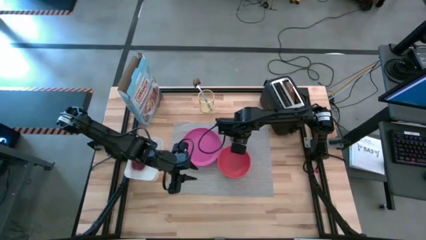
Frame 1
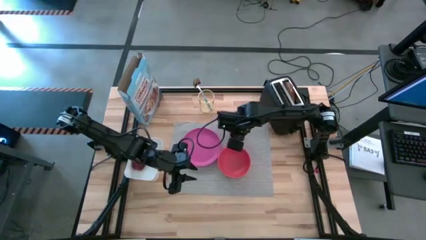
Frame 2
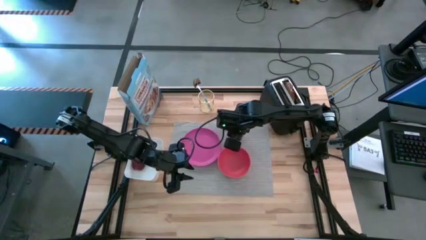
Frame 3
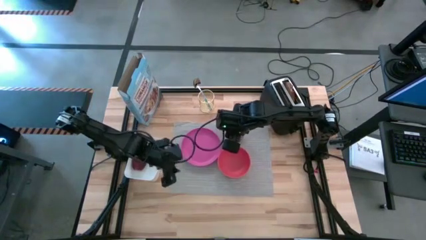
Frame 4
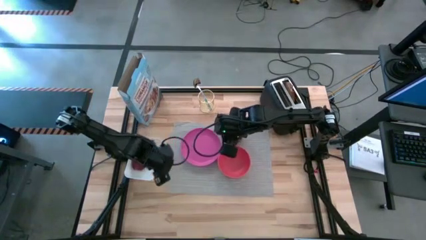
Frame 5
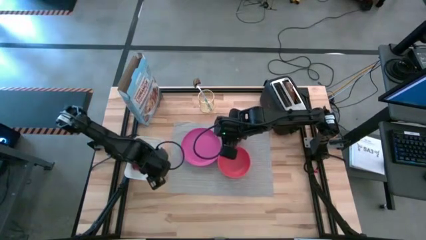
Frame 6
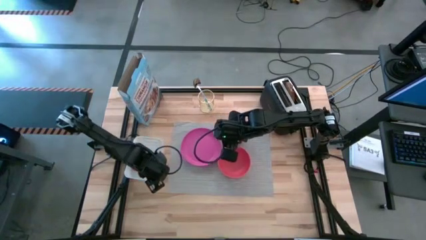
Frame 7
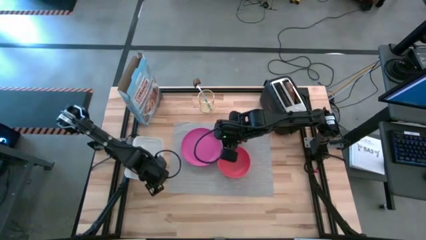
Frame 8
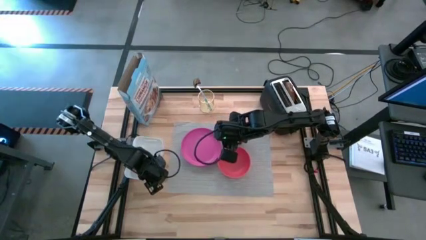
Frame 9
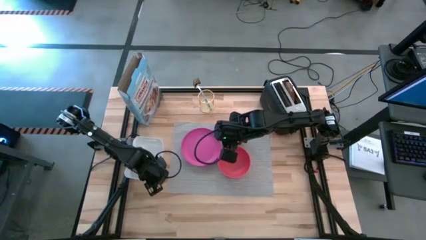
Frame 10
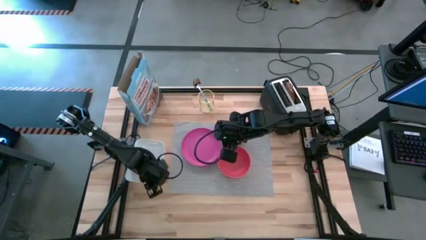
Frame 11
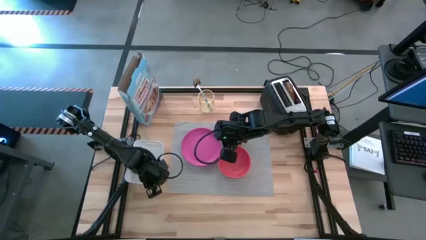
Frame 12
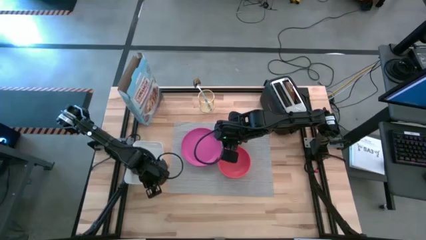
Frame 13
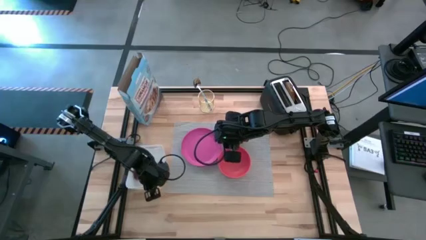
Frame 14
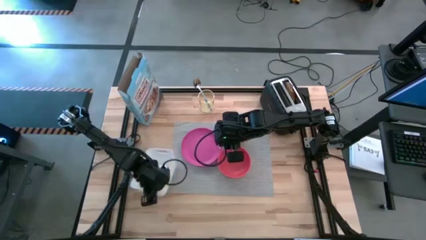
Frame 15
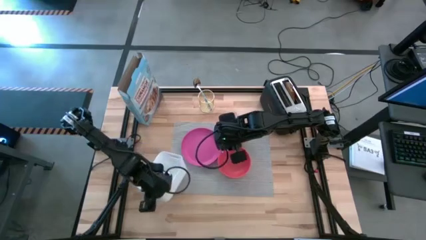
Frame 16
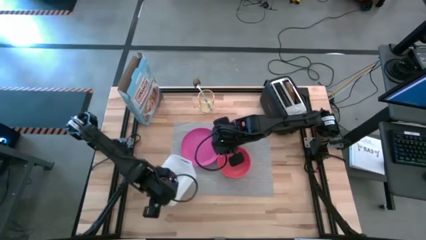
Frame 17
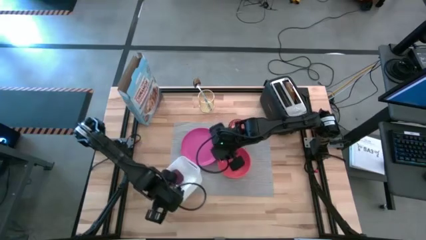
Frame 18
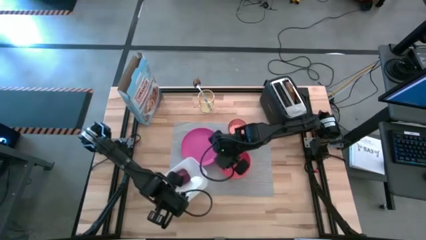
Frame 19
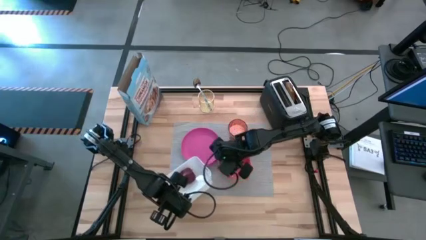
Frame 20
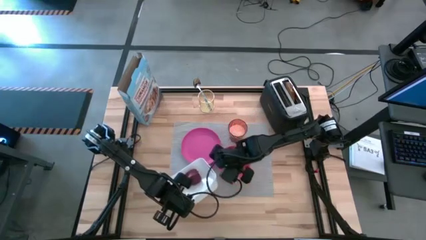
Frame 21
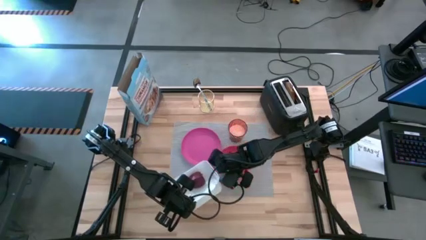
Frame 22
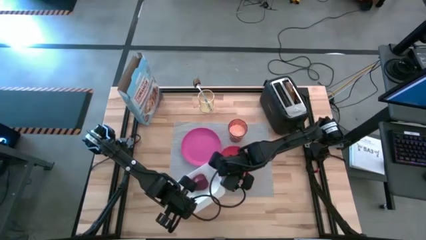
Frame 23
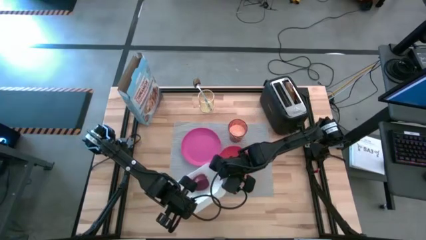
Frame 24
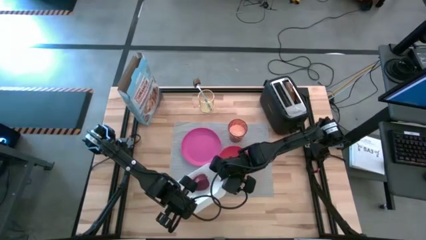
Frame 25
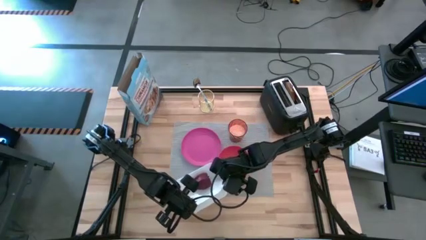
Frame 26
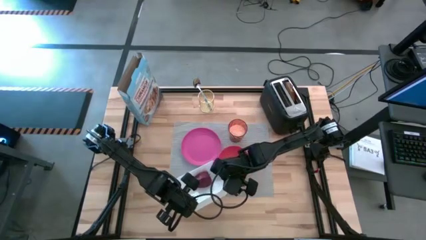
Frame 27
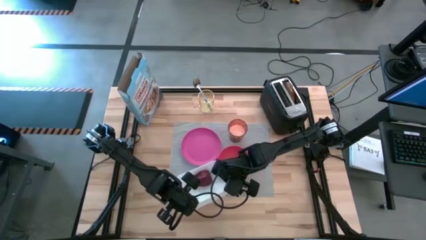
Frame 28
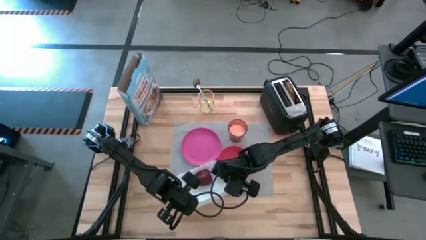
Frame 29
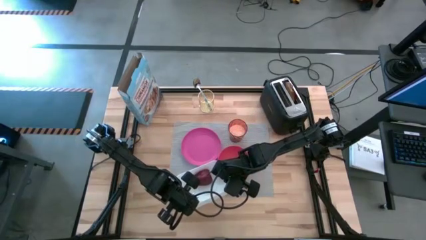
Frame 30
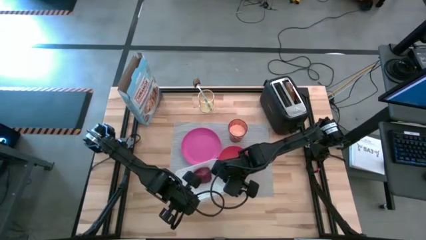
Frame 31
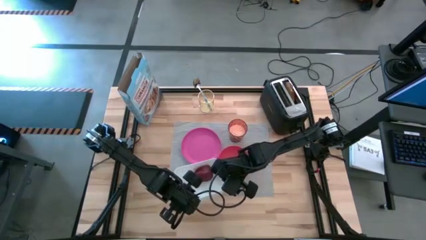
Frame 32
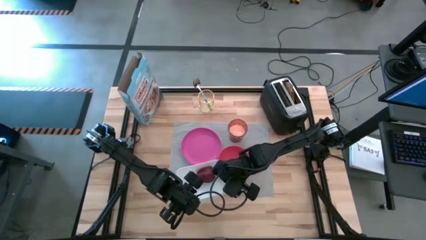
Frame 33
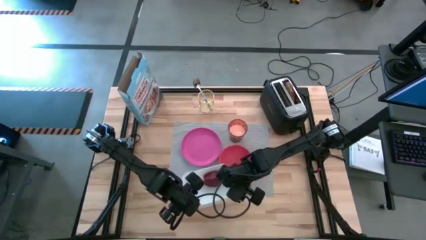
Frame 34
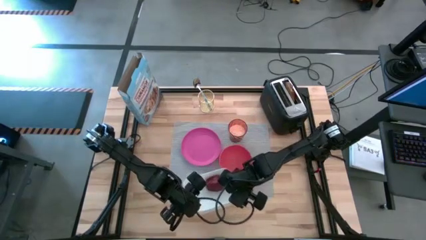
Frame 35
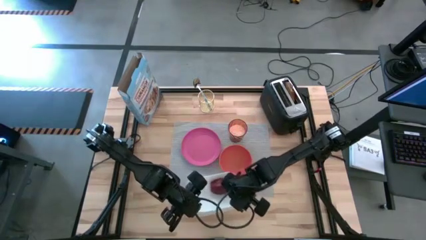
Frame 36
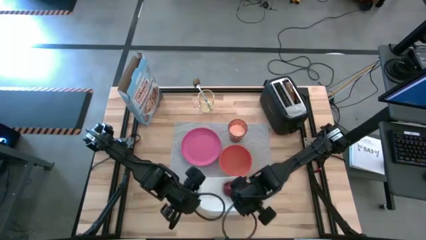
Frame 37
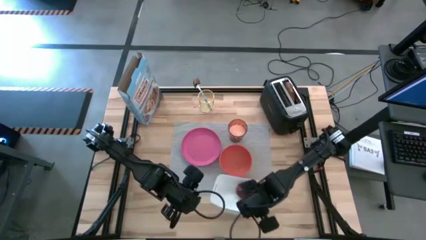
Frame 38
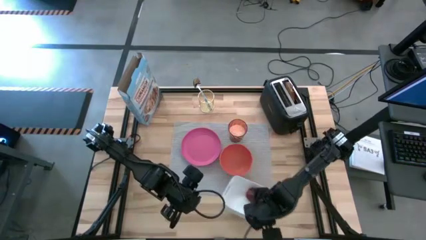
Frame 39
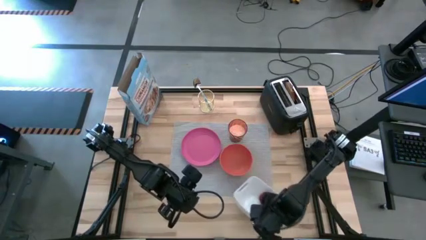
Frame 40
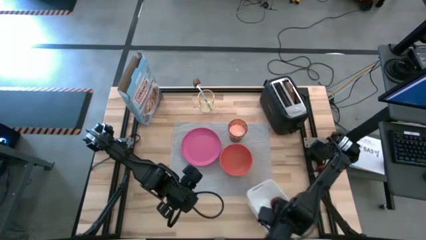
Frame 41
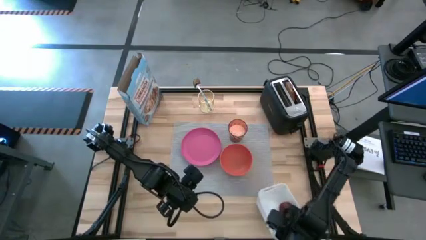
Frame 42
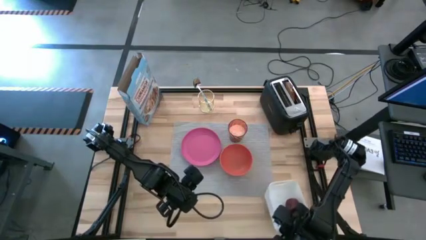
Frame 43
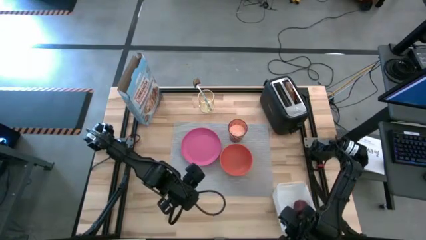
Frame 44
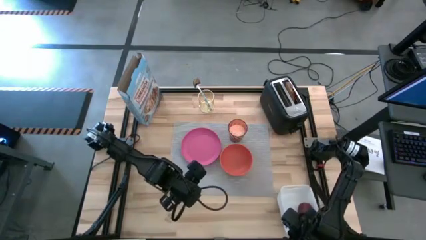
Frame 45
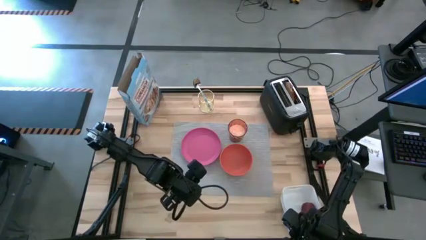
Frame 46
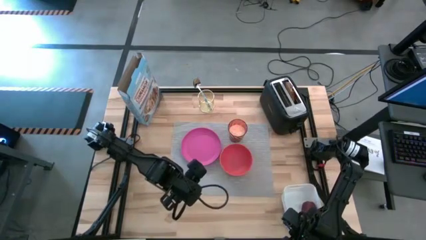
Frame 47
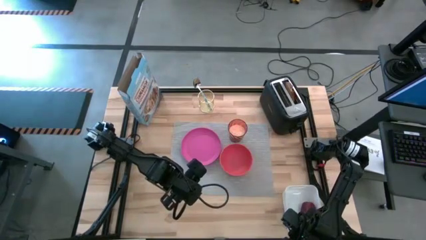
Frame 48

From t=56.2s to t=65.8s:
Task: Arrange a breakfast setting
Move the white bin to the bottom right of the table

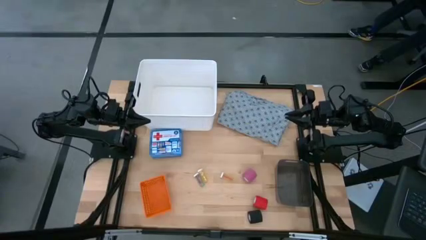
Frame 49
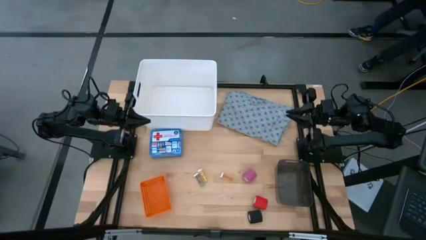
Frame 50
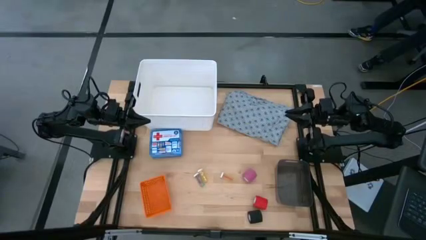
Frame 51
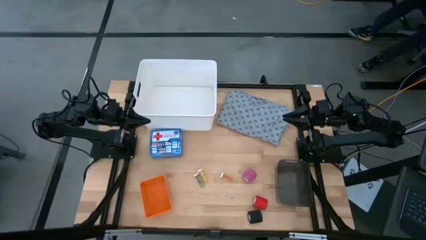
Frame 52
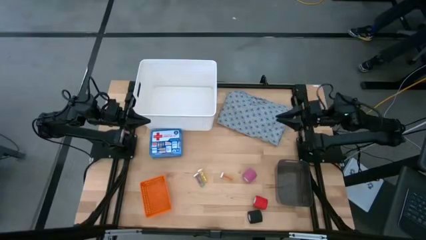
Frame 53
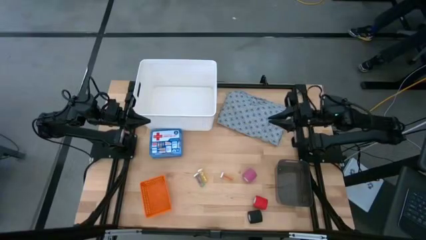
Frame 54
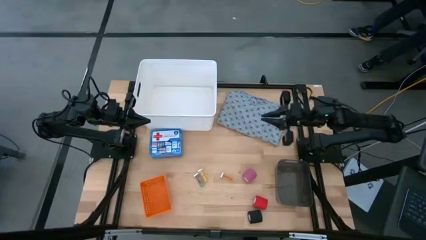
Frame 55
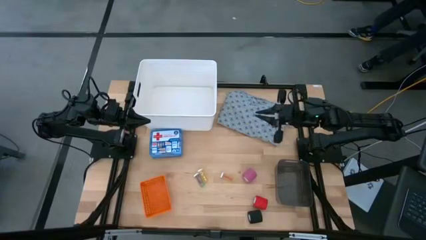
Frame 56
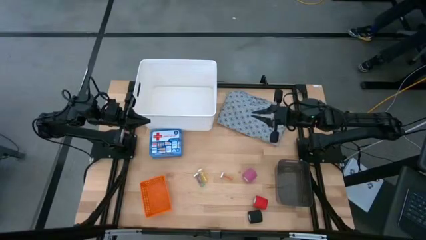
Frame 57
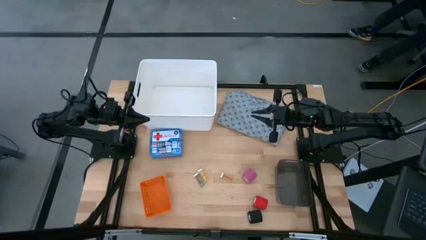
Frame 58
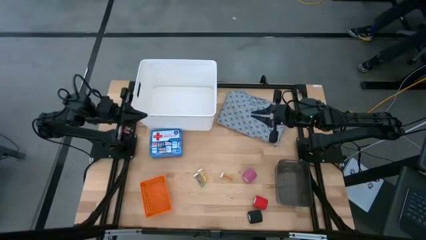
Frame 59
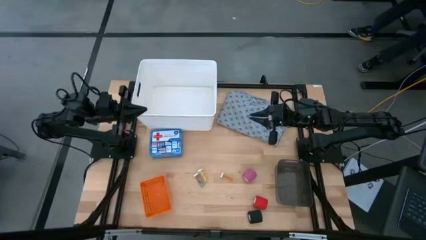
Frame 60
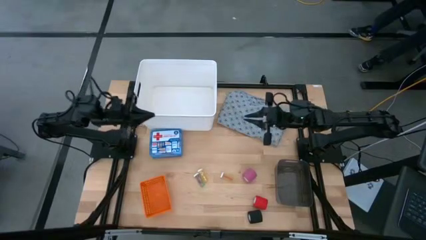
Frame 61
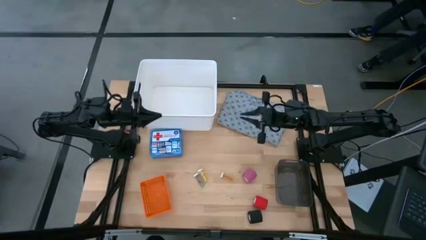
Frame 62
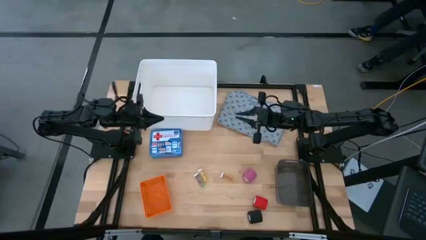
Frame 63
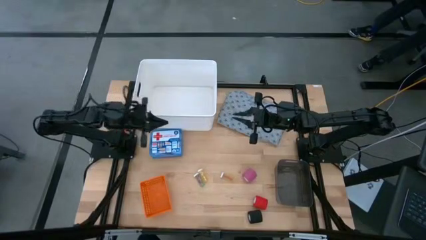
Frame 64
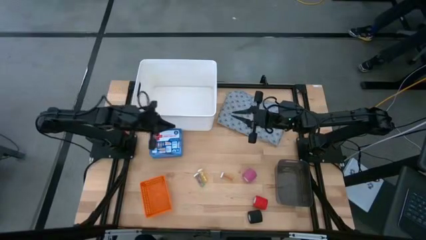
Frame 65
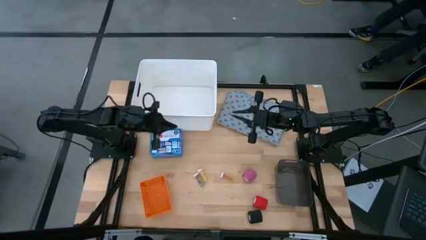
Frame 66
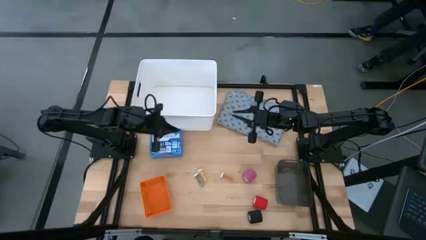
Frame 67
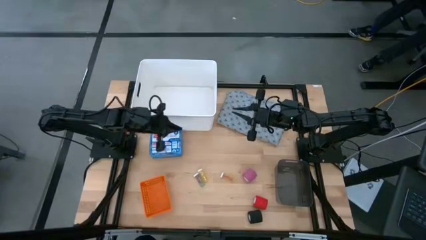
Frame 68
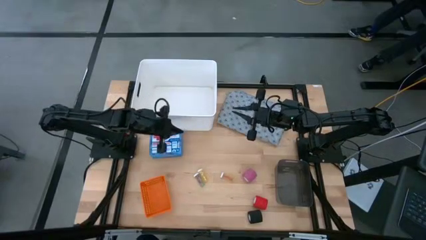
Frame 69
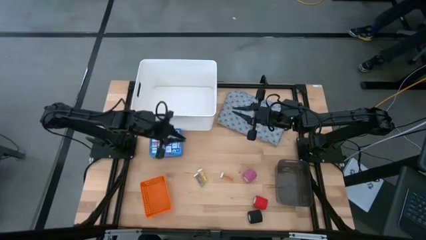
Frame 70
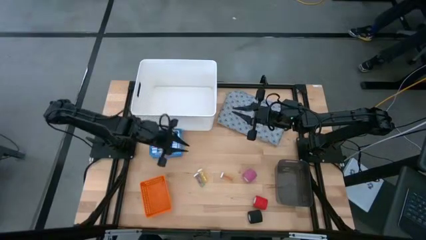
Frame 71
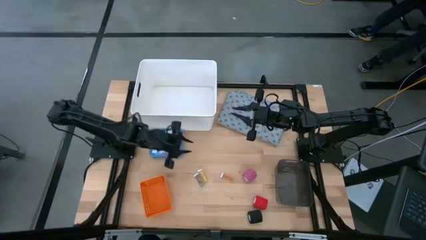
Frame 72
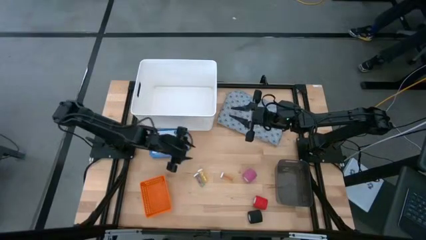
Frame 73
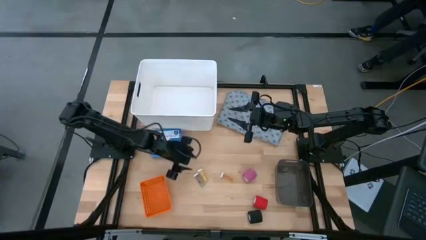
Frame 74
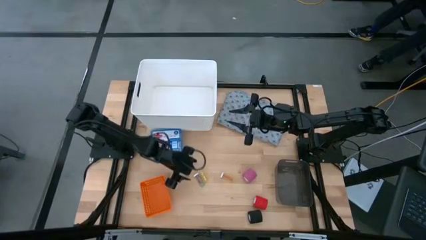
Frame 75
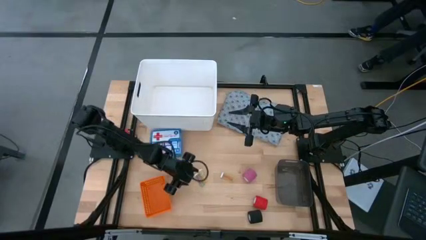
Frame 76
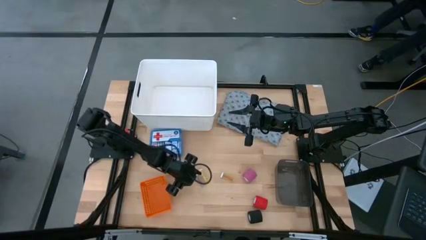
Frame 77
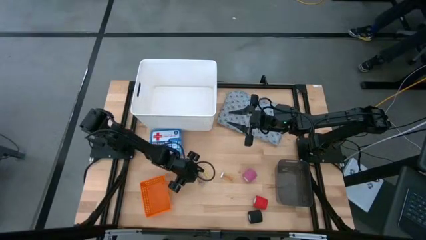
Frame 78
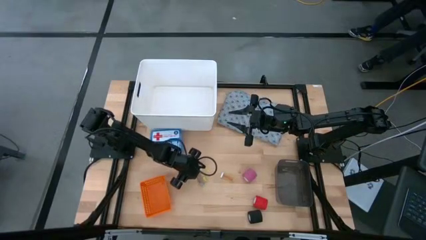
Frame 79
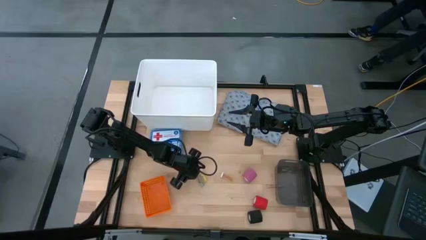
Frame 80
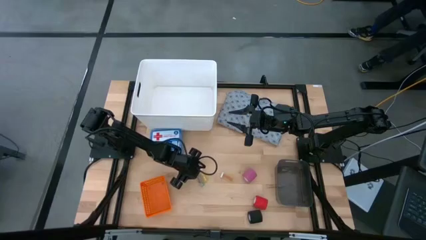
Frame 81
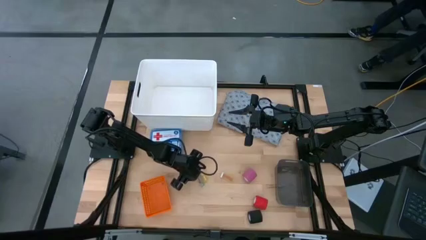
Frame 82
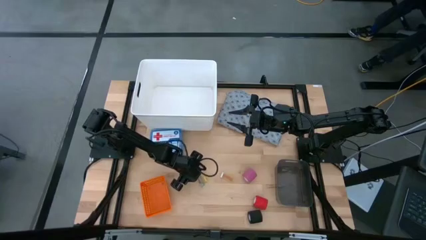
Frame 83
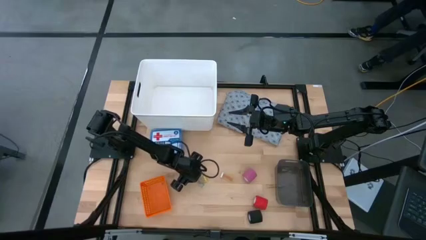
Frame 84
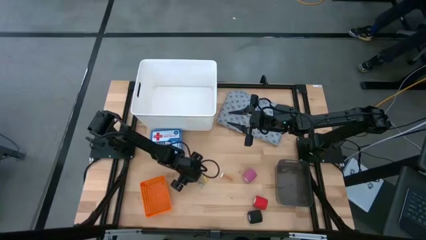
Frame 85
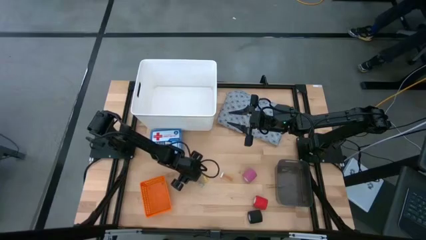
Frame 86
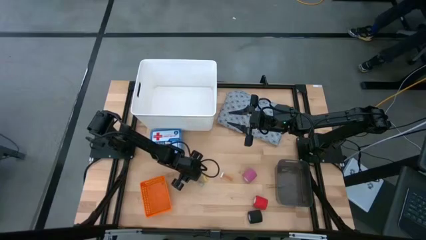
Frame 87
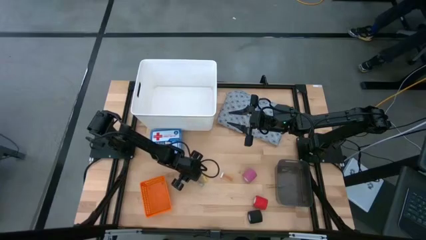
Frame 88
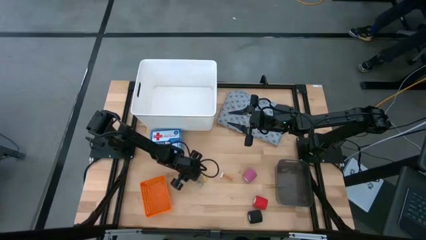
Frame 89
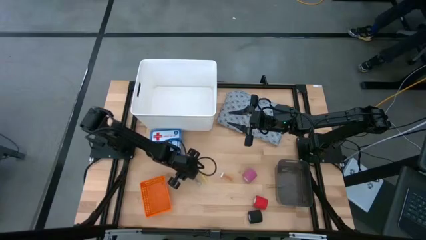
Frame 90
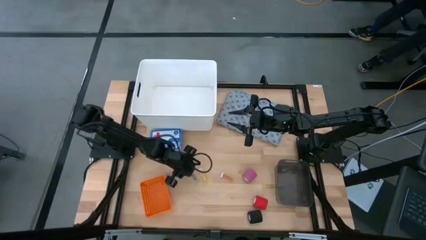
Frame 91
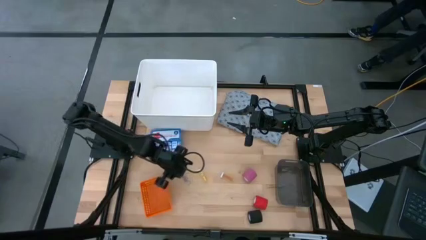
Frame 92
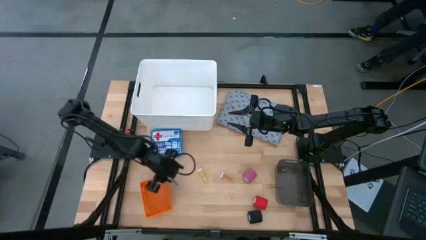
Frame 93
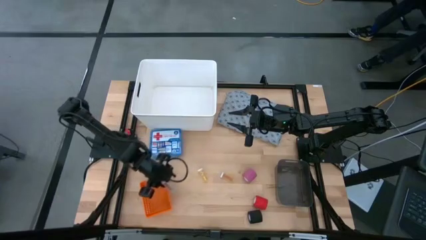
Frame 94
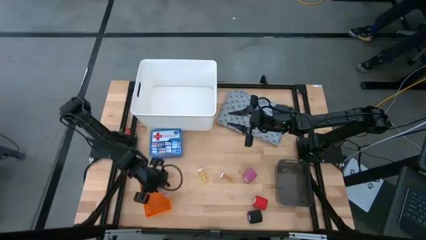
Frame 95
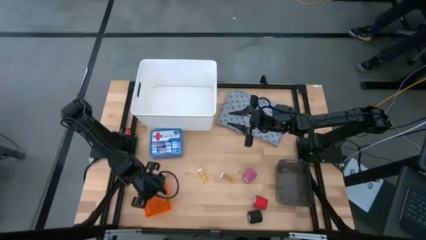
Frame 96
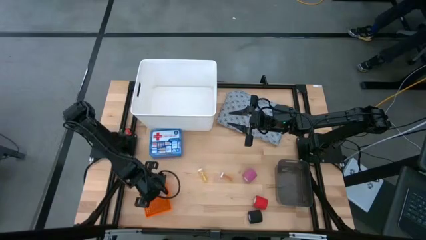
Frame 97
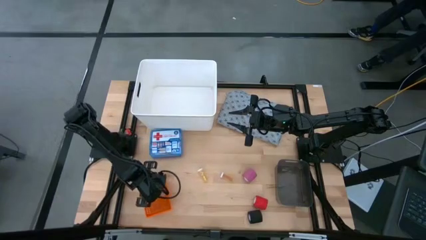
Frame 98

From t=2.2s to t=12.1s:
Task: Pick & place medical supplies in basket/bin
Put the blue pill bottle in the orange bin
